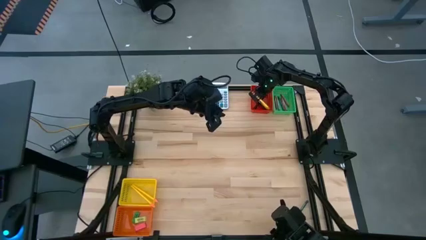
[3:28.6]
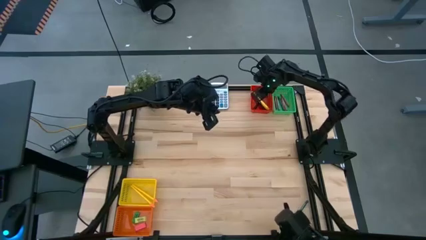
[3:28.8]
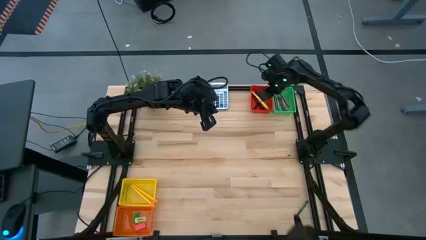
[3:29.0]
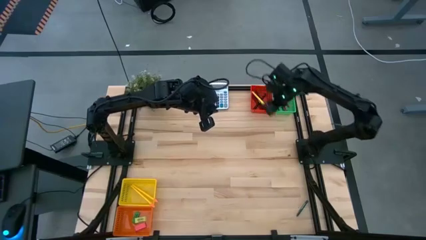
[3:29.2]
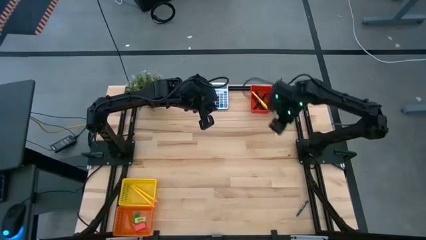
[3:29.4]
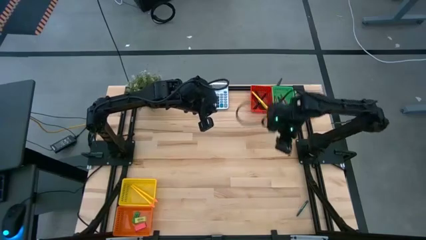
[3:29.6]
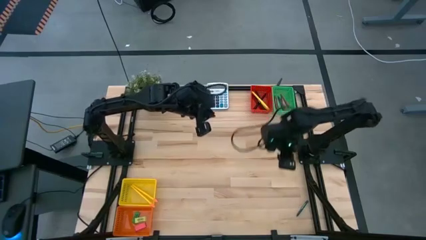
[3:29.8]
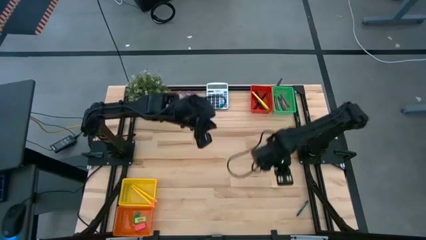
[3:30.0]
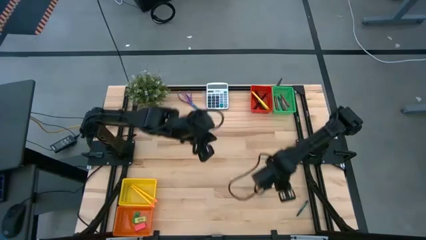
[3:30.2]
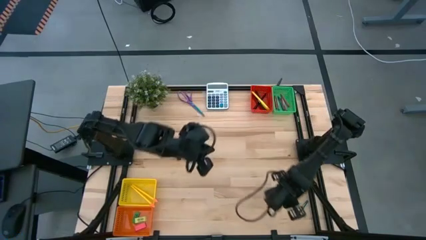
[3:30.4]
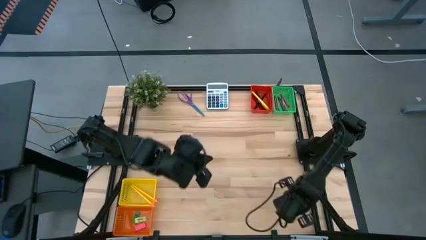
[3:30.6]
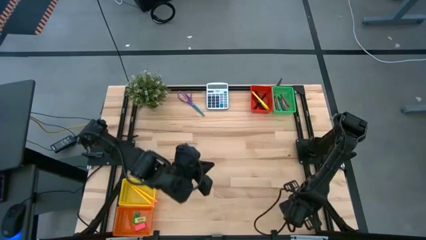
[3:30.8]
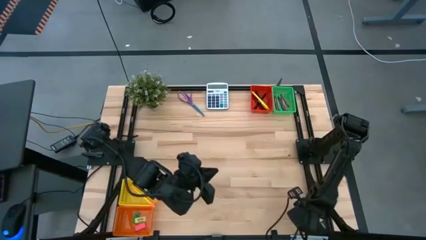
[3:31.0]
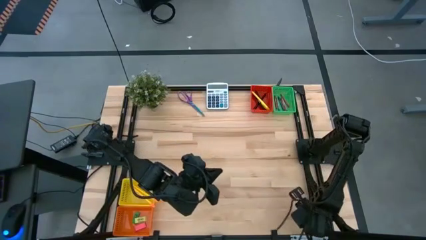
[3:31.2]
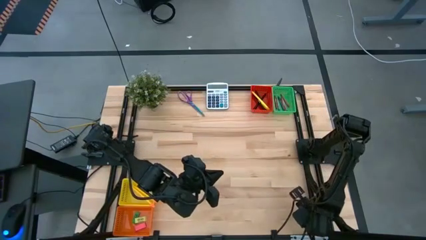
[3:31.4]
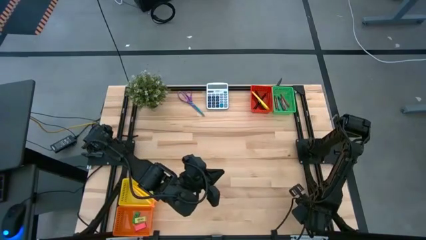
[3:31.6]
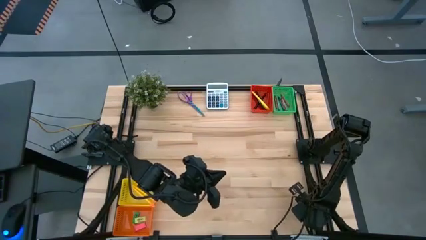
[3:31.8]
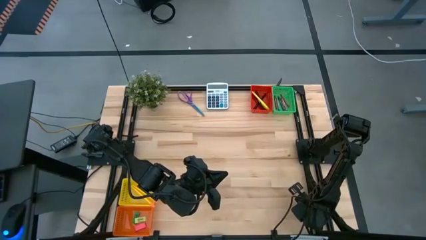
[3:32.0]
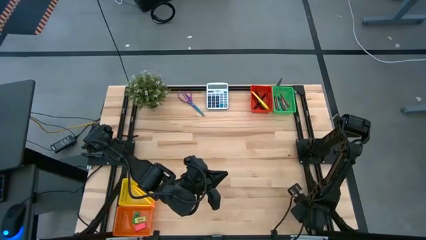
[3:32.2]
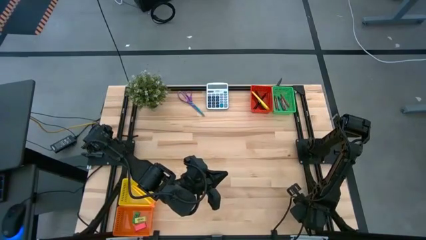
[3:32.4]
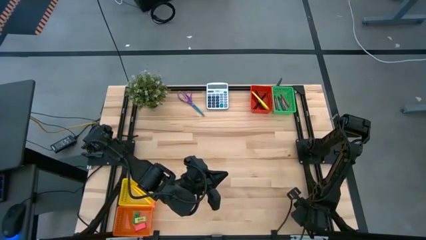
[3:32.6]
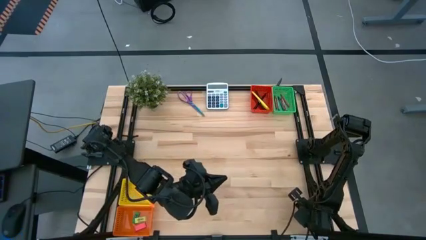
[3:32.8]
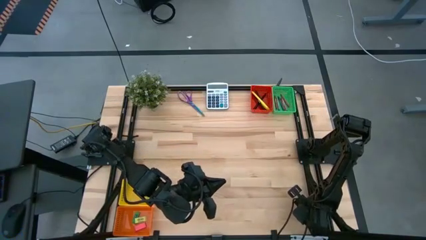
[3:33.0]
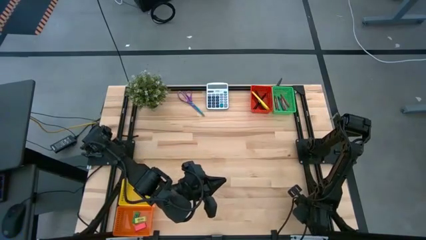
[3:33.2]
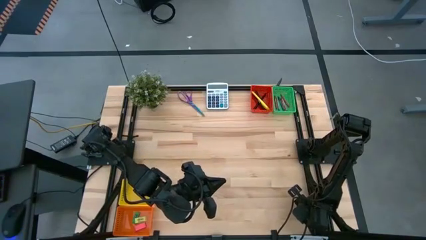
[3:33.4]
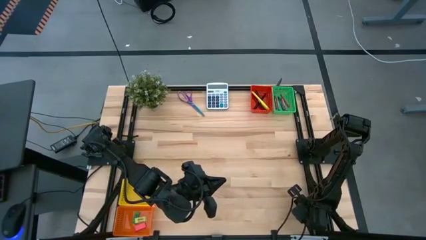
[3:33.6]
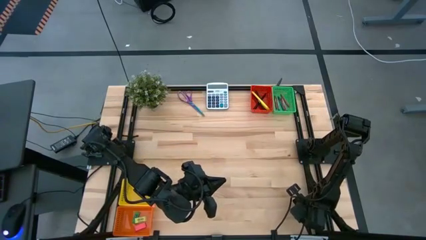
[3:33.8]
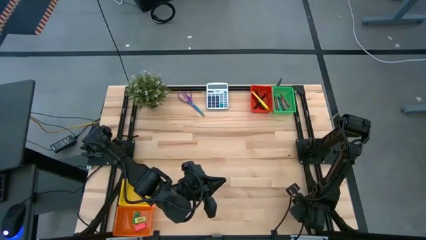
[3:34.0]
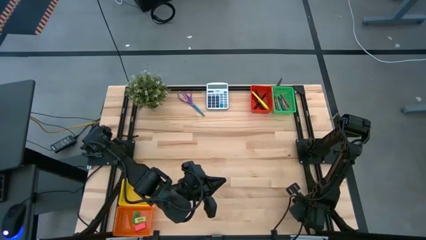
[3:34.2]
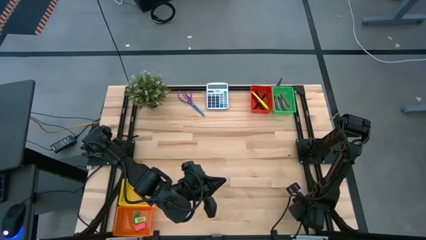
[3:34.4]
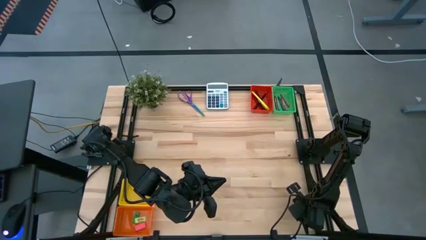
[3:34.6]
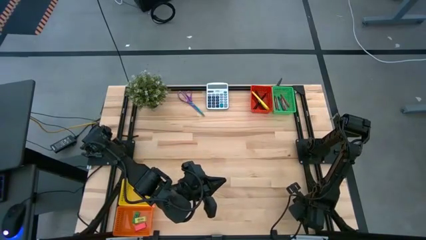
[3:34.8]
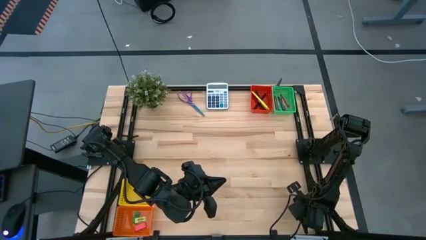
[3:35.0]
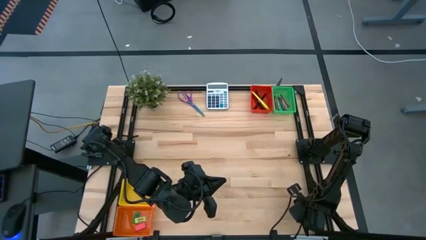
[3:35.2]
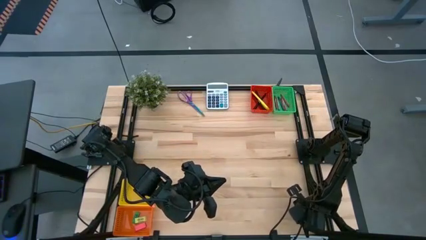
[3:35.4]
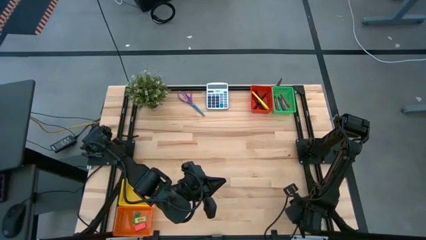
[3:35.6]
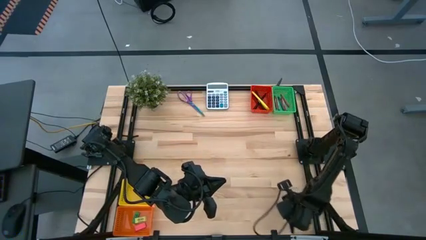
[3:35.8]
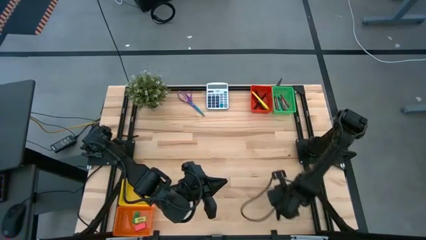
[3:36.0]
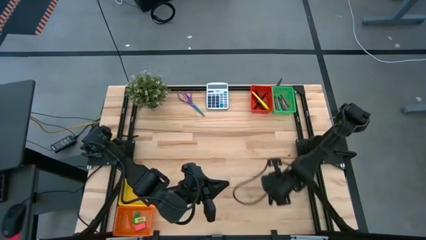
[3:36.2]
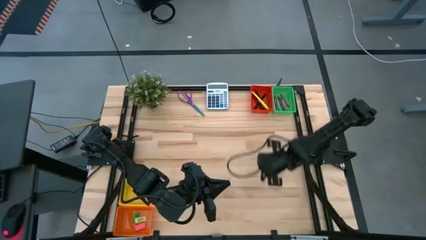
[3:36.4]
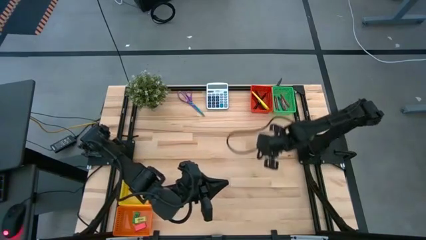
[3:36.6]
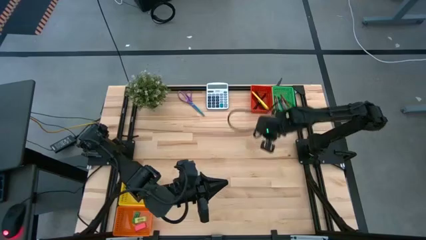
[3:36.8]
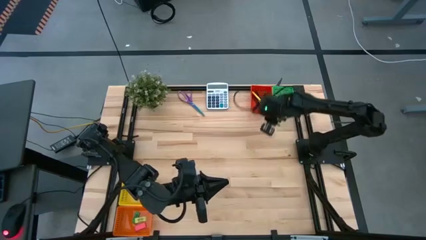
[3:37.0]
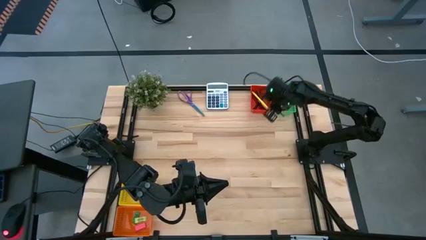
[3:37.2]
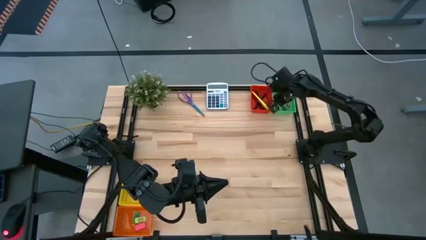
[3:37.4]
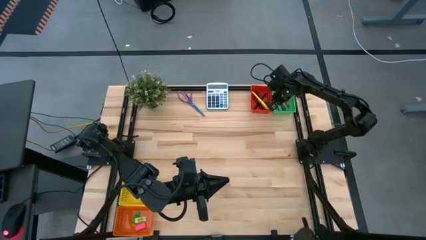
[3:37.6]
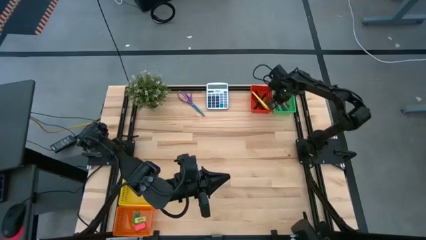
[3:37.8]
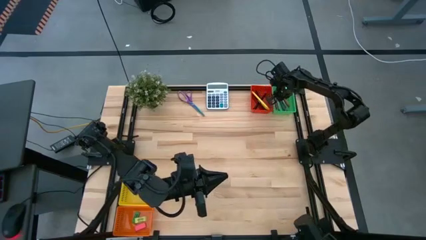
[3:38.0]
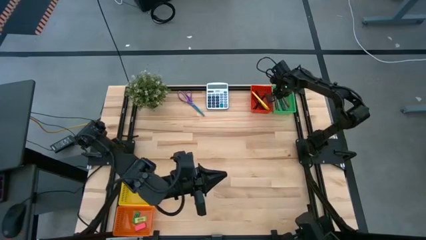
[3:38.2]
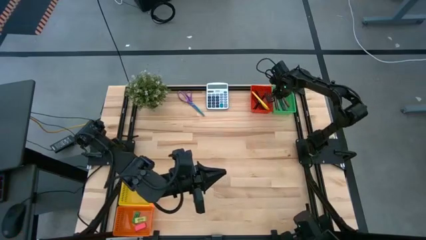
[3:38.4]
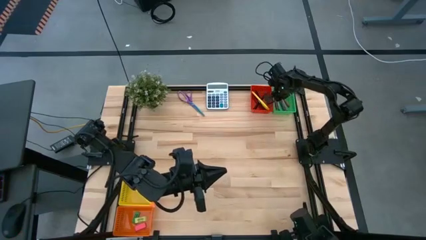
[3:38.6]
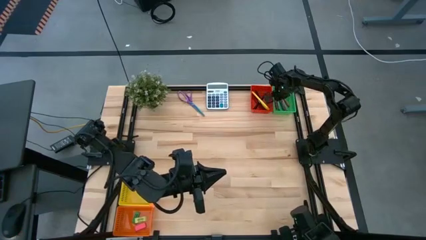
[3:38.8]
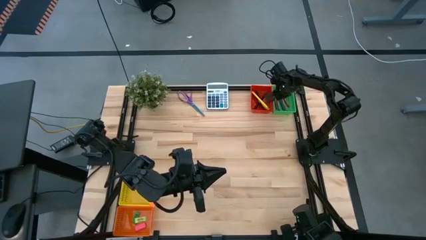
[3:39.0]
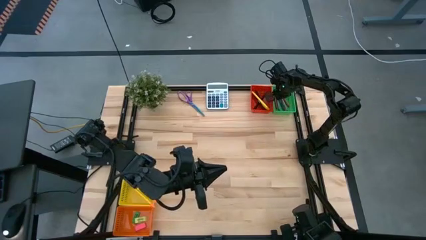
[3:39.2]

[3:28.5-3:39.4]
Task: Sort crayons/erasers/pens/pencils in bins
Put the green crayon into the green bin

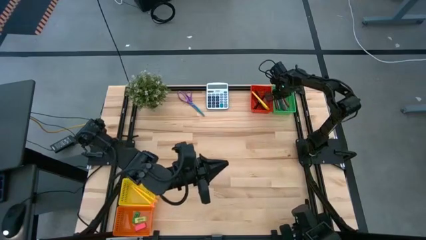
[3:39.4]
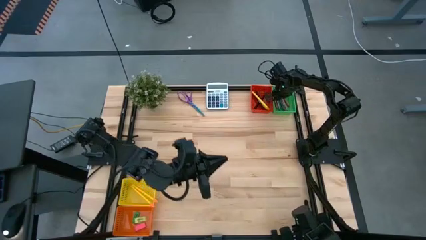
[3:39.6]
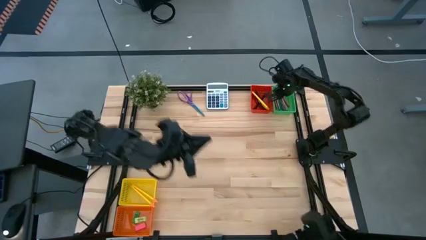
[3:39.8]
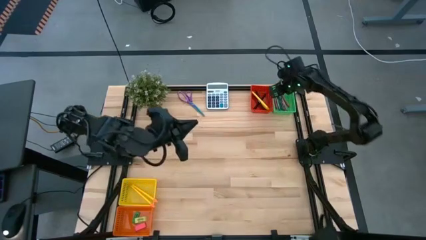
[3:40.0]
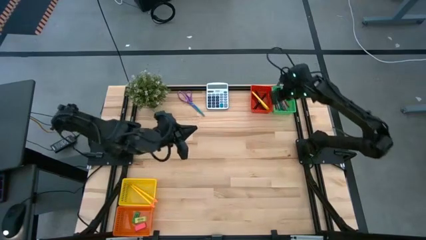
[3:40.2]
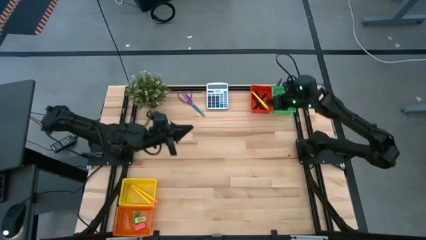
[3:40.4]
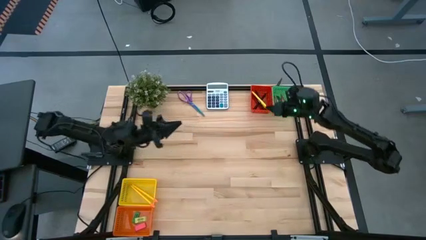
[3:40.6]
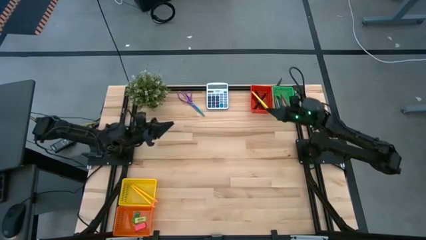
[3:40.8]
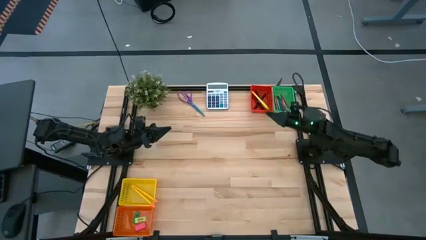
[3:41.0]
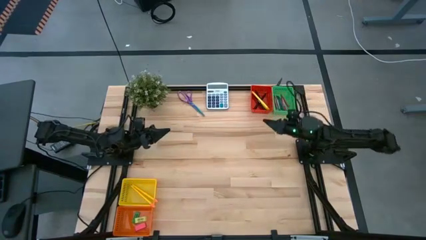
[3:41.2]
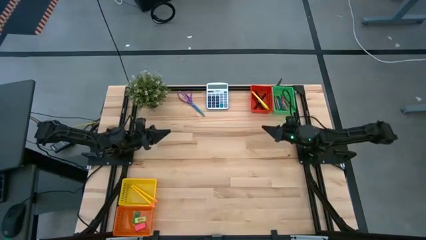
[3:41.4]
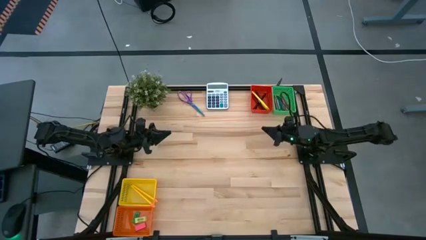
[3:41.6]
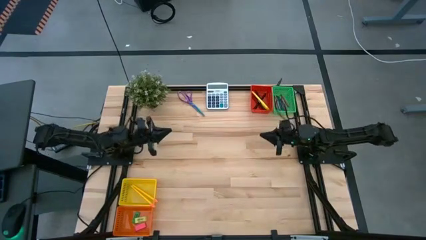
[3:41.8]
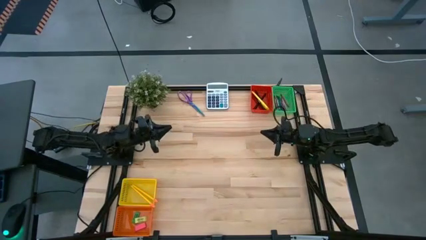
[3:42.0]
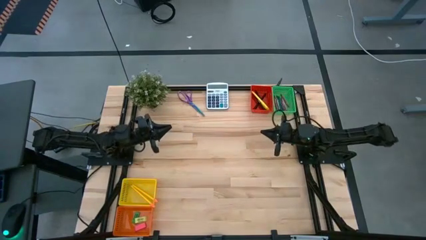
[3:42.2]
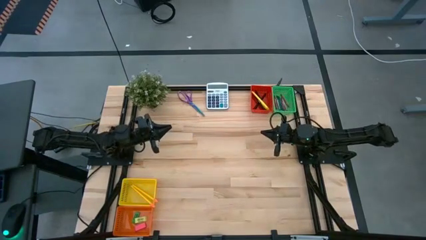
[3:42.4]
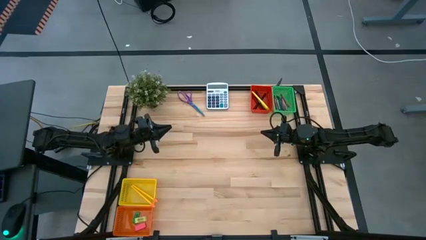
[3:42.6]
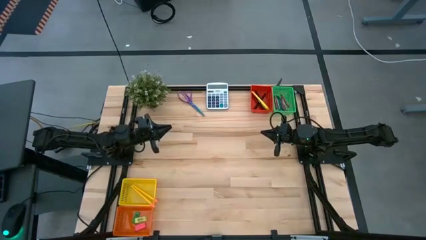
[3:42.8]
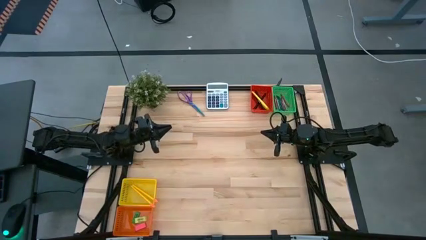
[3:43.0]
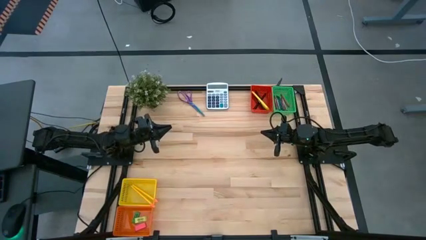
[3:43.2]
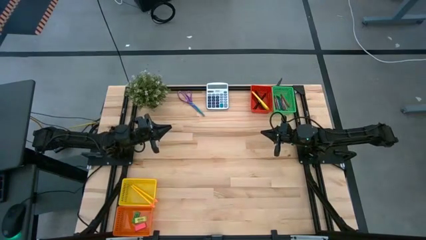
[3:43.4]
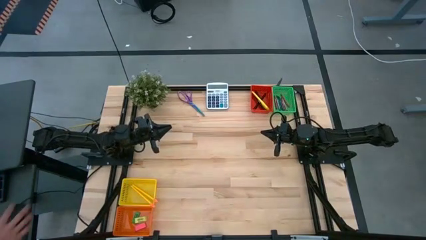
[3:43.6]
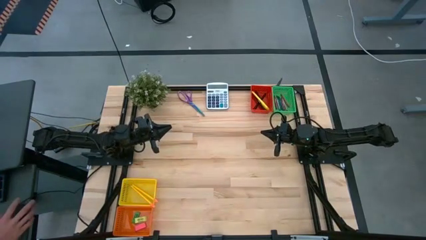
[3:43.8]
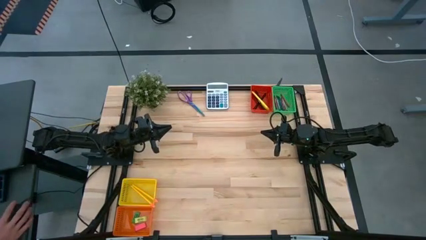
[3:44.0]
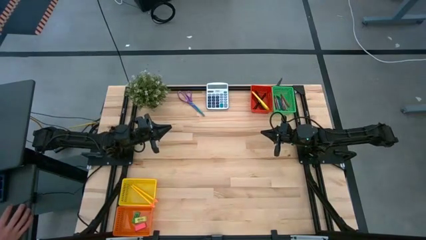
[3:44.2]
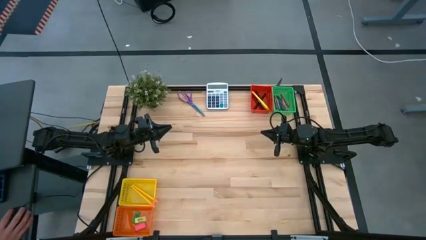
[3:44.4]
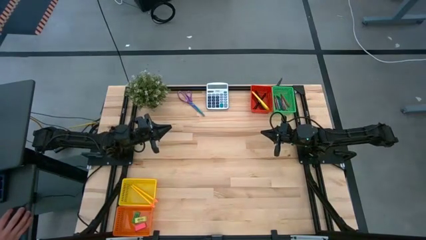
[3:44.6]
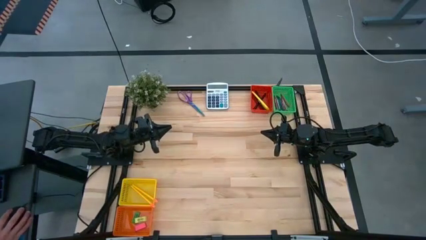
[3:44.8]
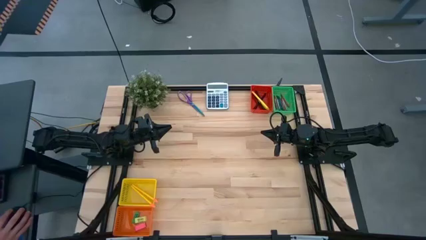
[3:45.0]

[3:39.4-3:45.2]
Return to Home Position
